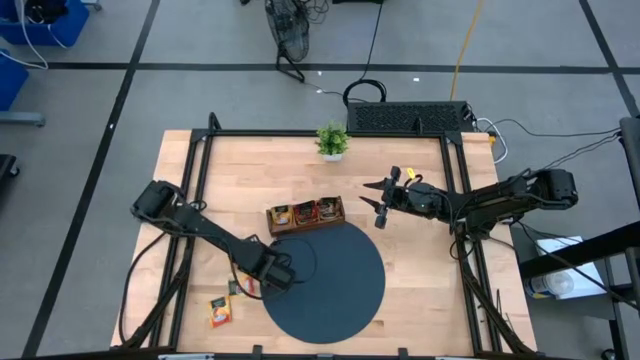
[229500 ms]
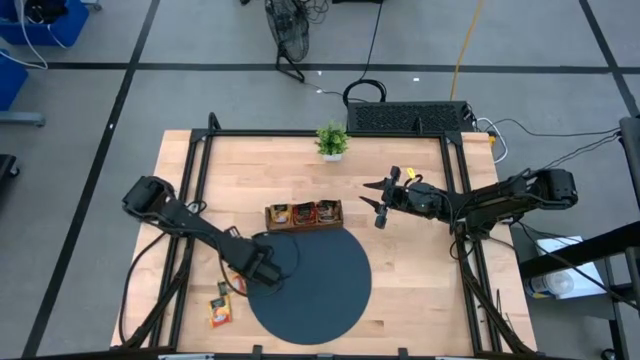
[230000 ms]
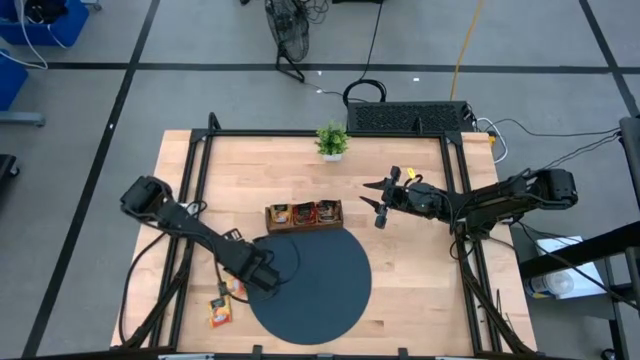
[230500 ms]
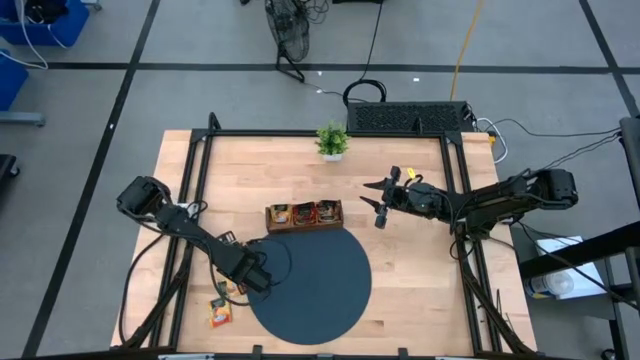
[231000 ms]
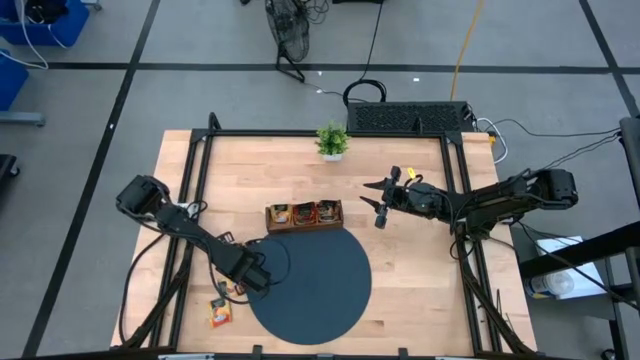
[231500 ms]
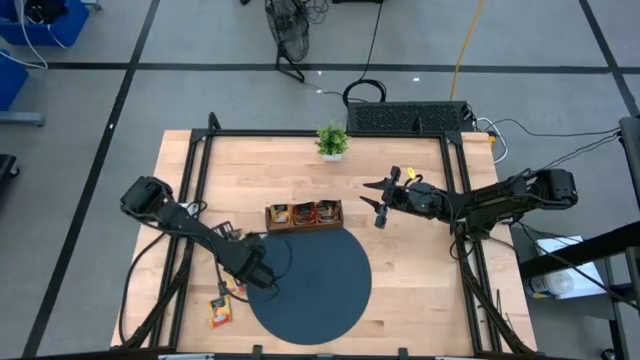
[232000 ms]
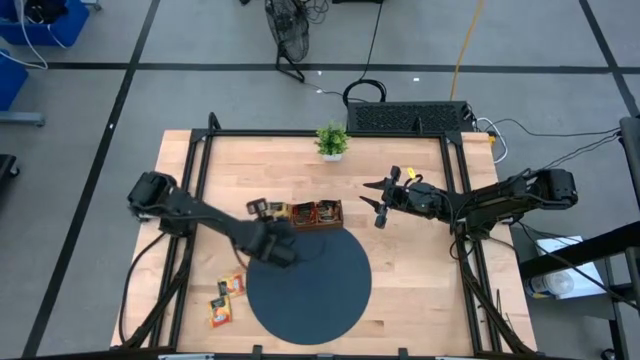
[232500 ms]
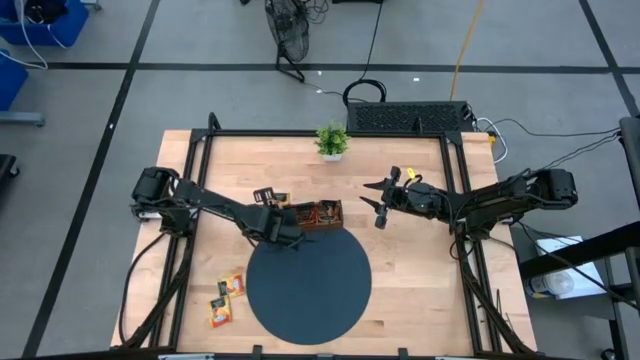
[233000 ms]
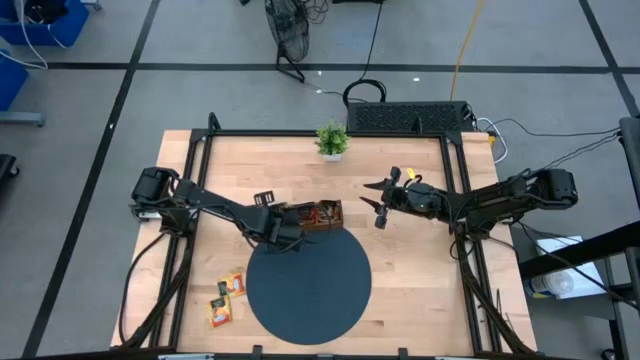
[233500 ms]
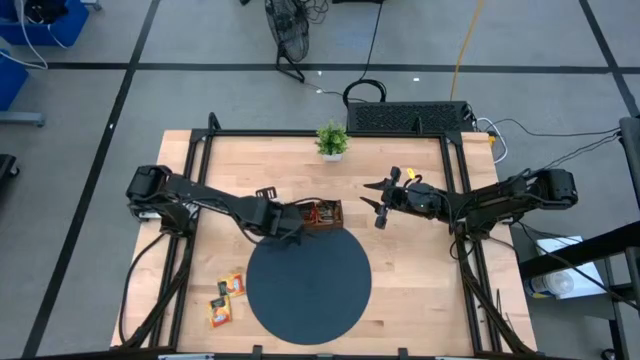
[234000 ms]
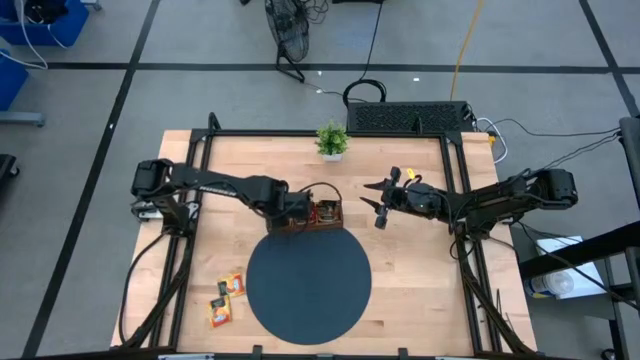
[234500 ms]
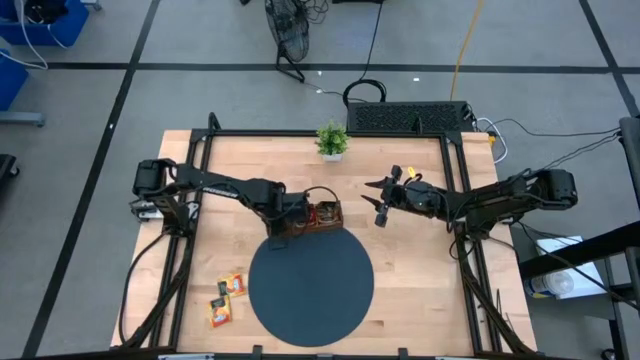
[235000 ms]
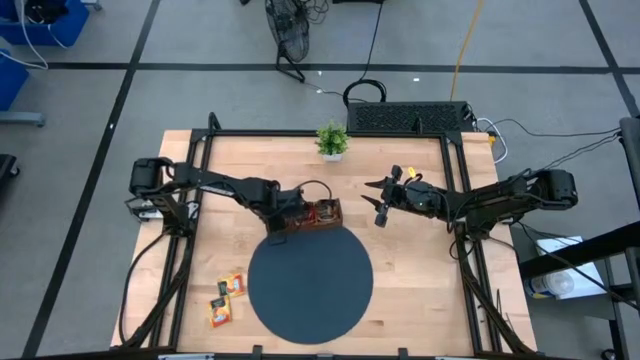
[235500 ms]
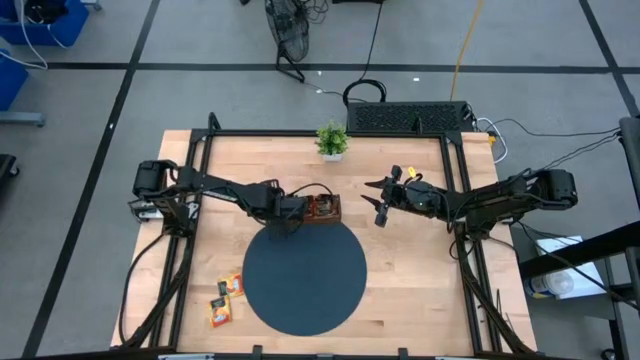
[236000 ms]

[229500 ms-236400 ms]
Task: Pick & Place Tea
Put the top yellow tea bag into the left slot of the wooden organizer

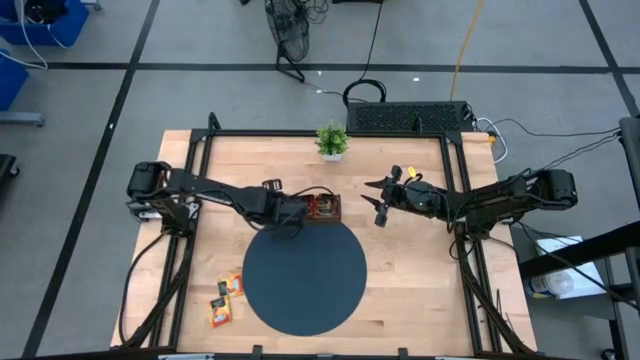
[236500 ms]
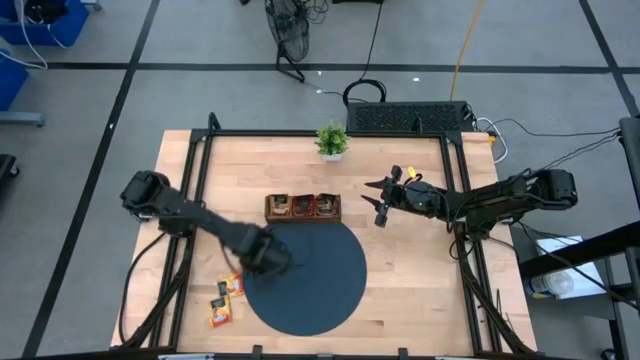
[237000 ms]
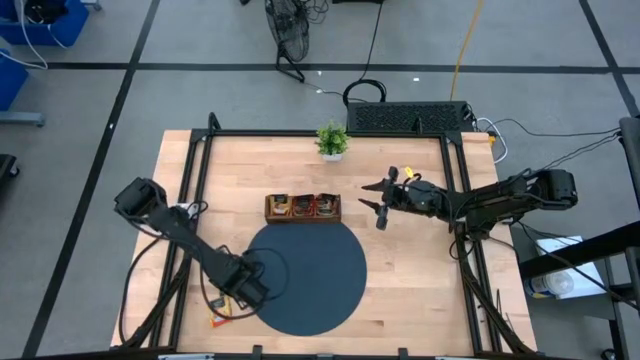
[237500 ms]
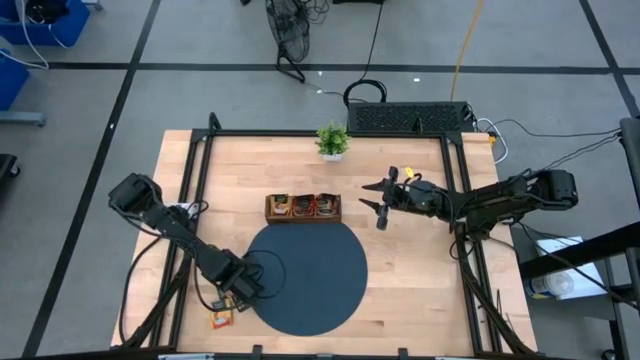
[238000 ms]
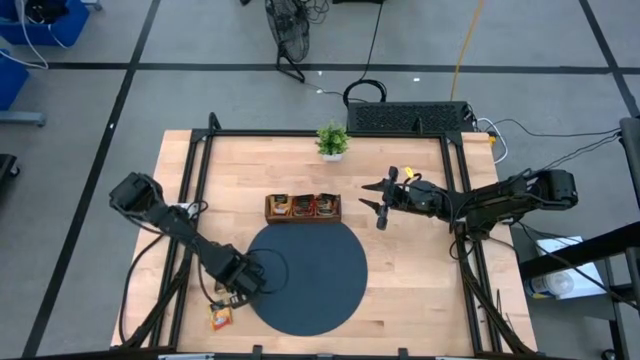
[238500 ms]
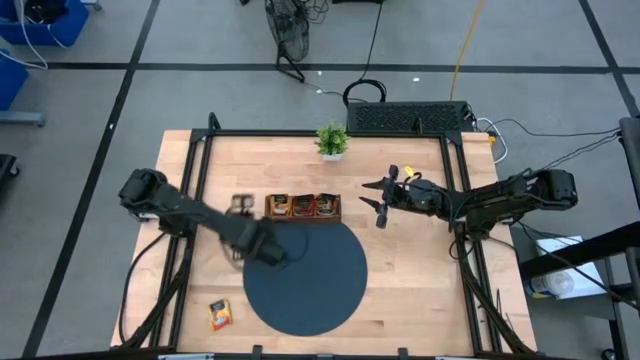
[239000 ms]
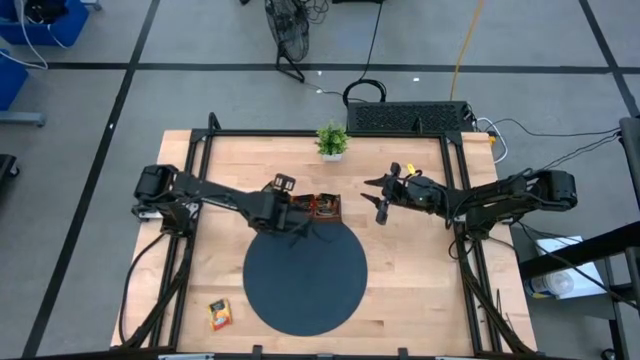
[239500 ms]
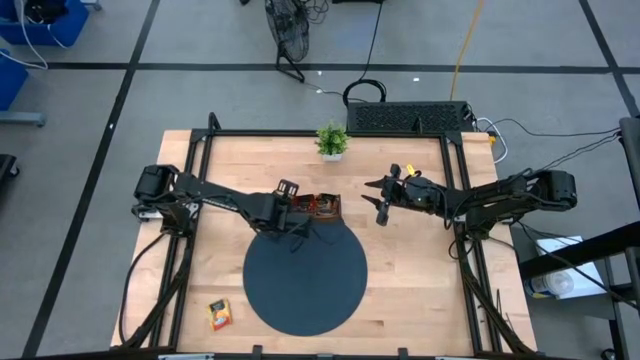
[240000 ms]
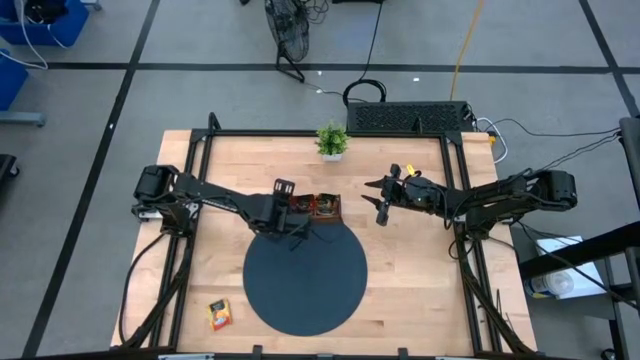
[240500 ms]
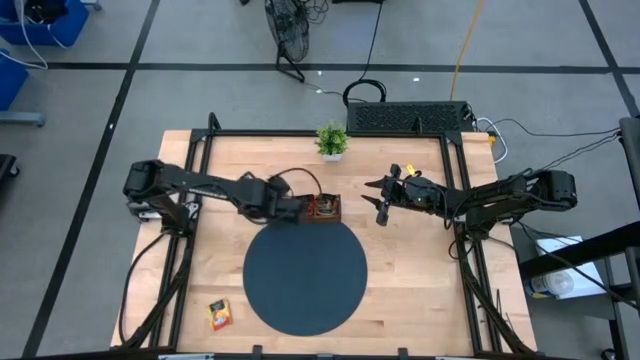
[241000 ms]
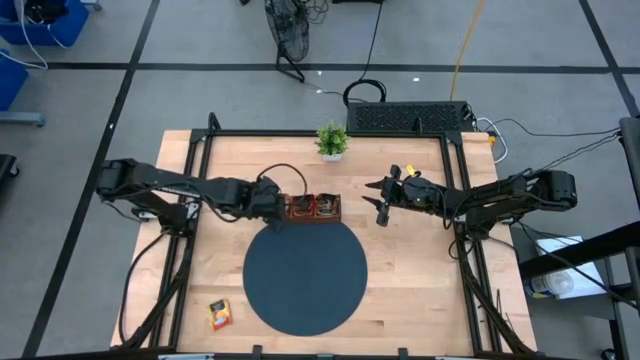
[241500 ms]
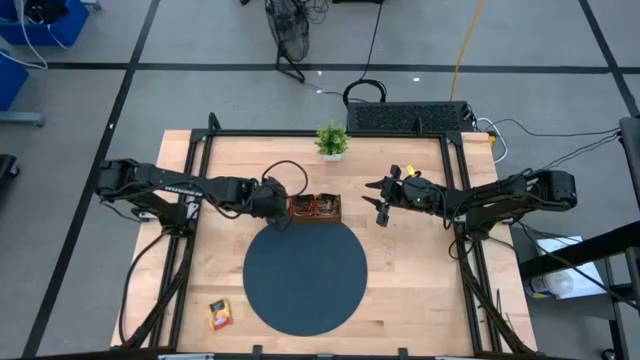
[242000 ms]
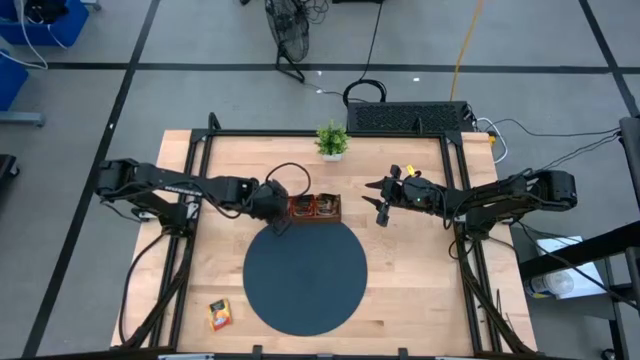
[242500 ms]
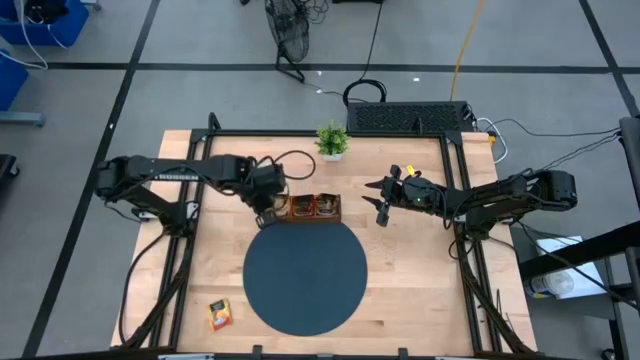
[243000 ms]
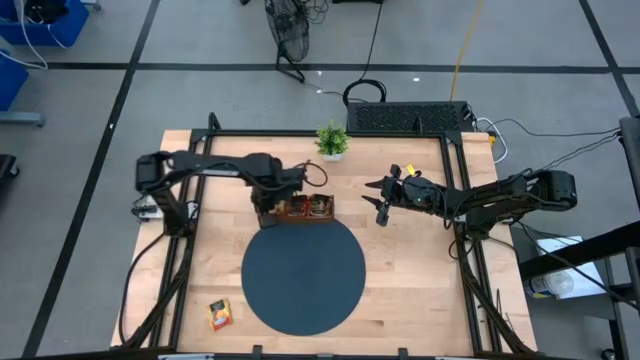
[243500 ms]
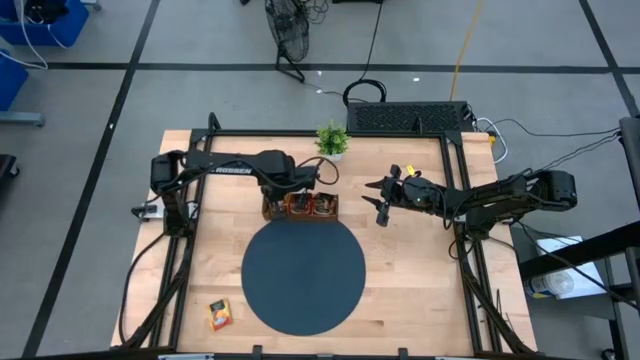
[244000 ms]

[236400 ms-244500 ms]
Put the top yellow tea bag into the left slot of the wooden organizer

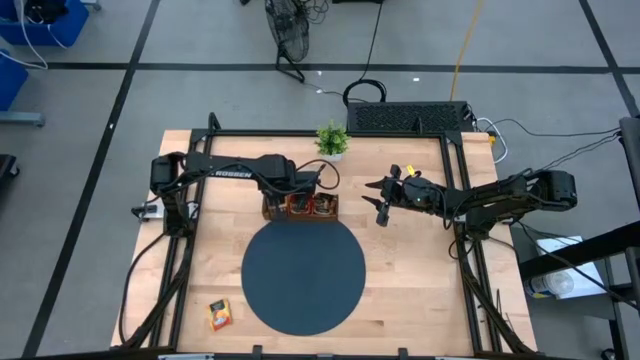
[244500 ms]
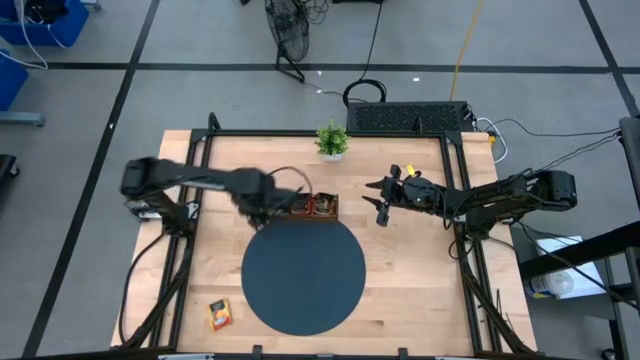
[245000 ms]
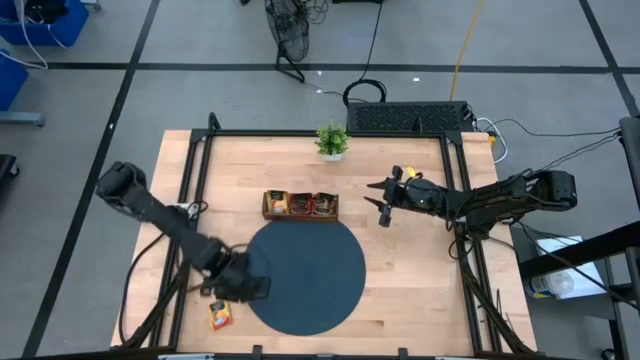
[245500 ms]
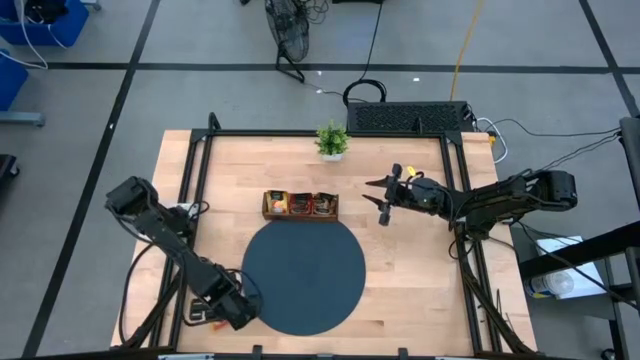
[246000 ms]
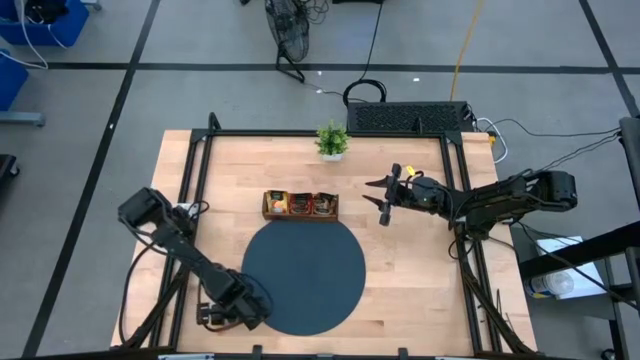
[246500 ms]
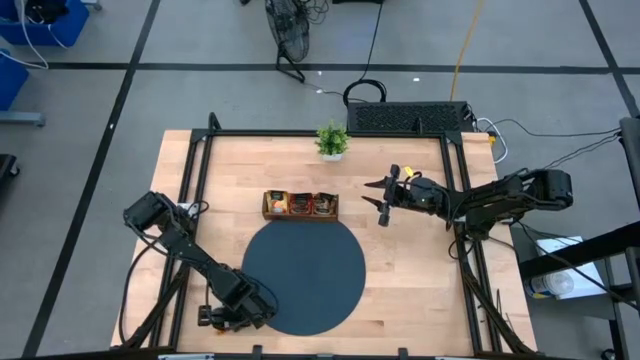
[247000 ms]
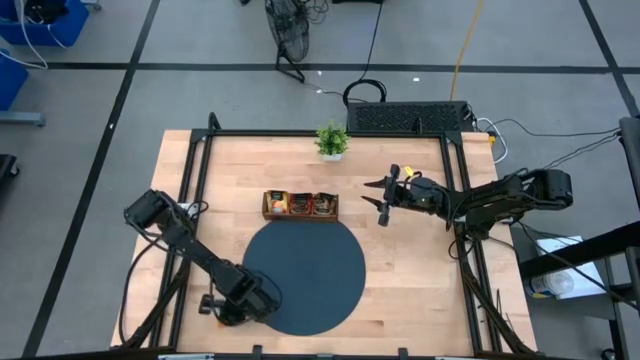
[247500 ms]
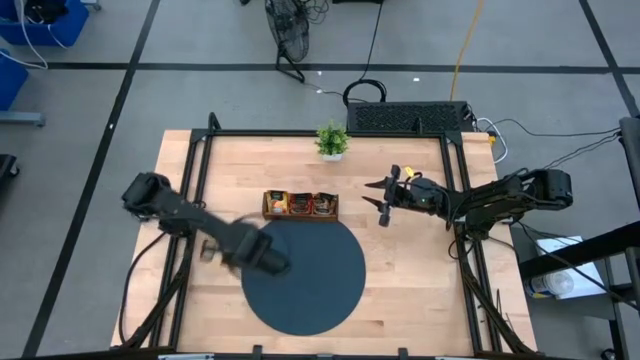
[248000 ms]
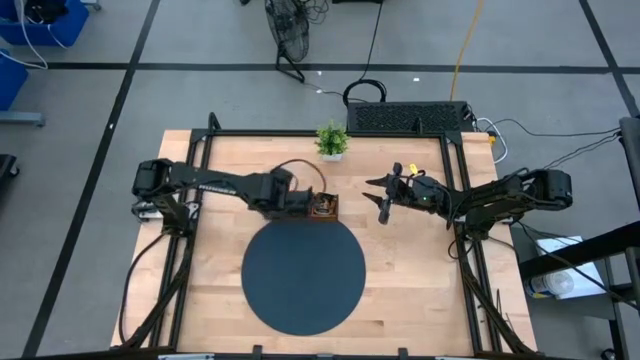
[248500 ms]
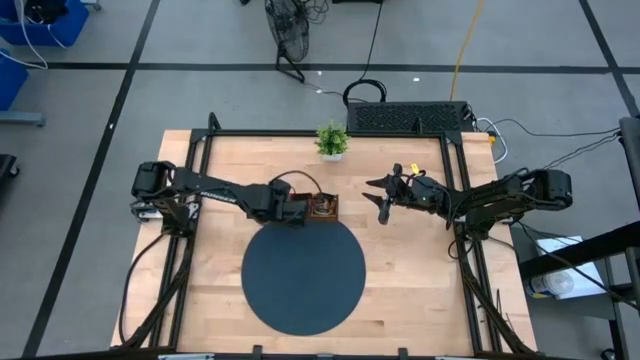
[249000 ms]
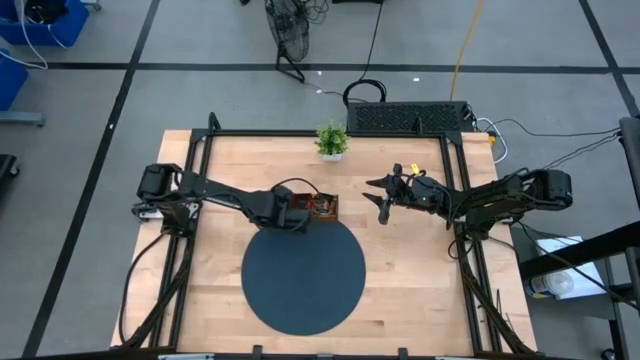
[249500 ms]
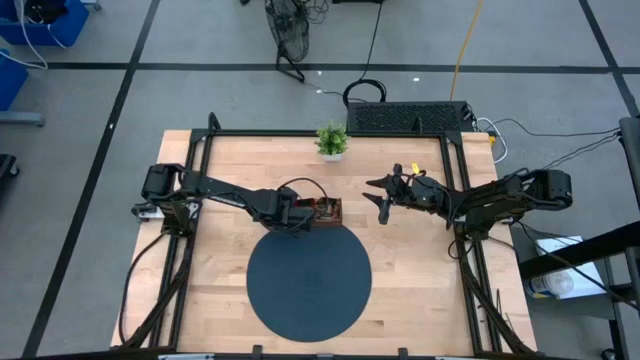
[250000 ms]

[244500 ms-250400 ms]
Put the yellow tea bag into the left slot of the wooden organizer
